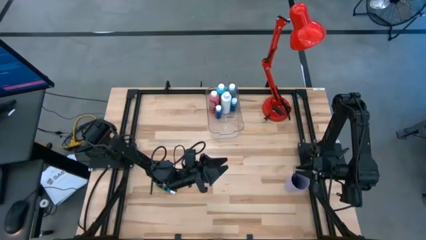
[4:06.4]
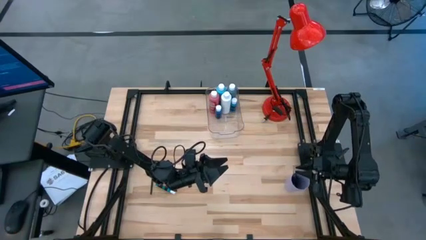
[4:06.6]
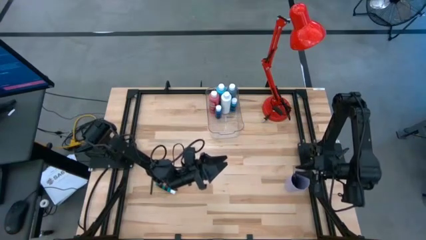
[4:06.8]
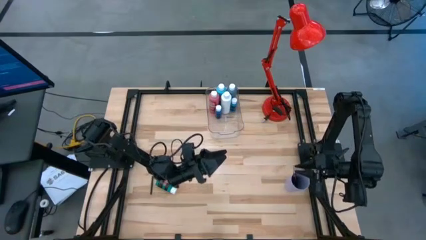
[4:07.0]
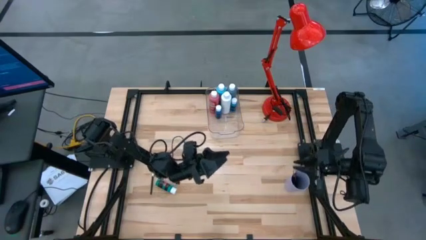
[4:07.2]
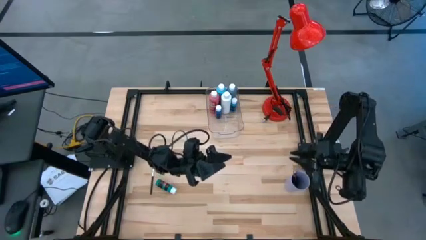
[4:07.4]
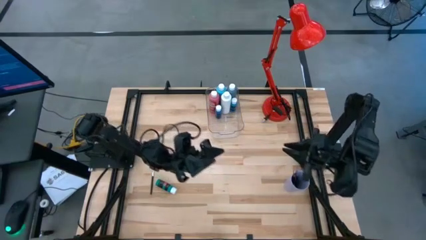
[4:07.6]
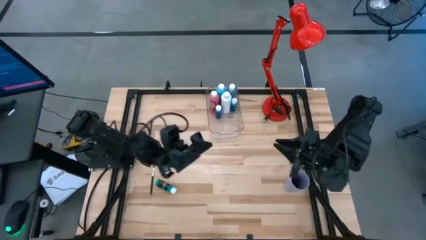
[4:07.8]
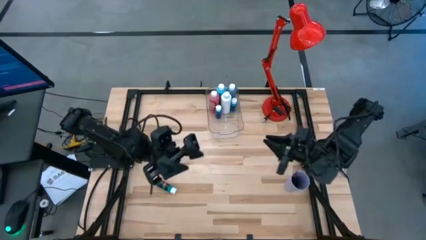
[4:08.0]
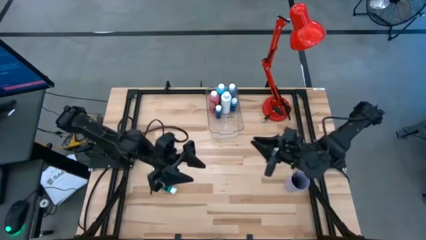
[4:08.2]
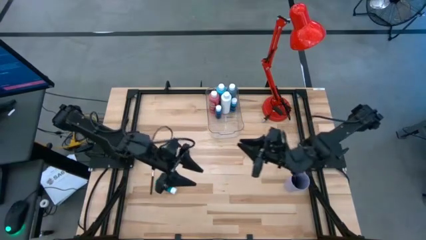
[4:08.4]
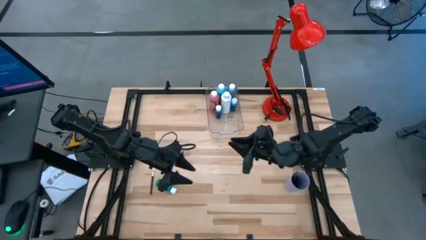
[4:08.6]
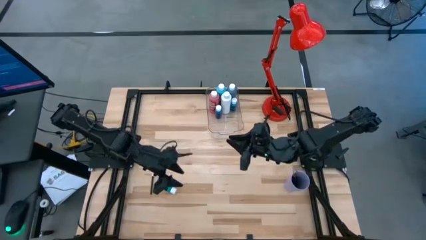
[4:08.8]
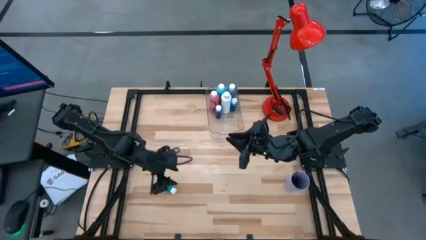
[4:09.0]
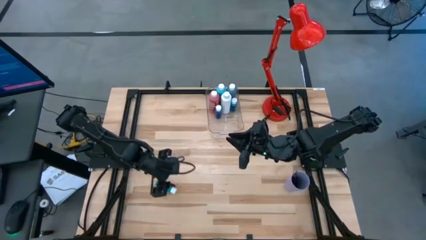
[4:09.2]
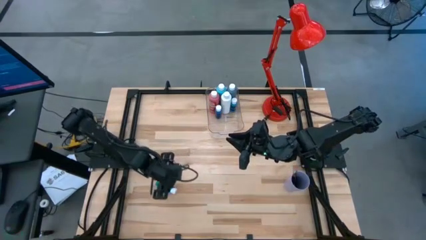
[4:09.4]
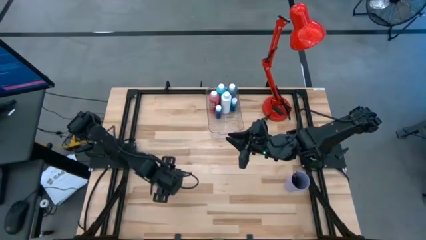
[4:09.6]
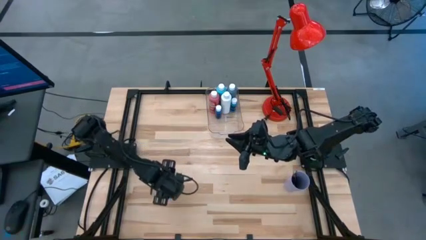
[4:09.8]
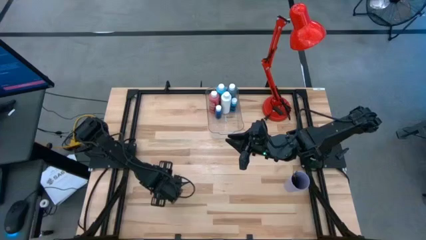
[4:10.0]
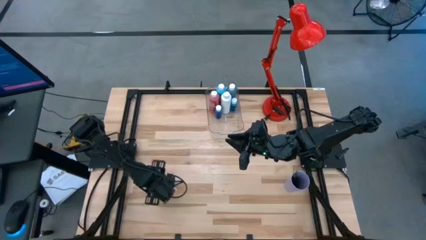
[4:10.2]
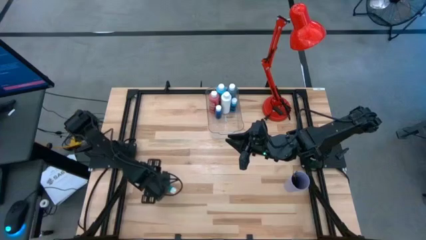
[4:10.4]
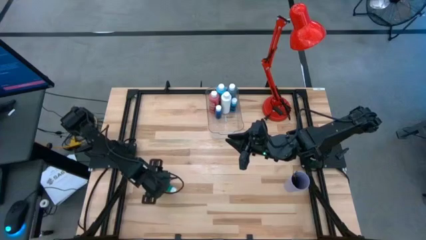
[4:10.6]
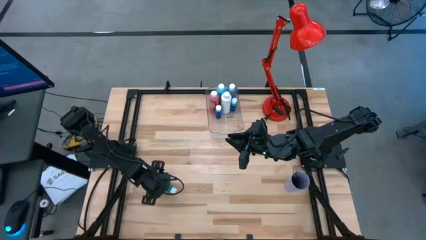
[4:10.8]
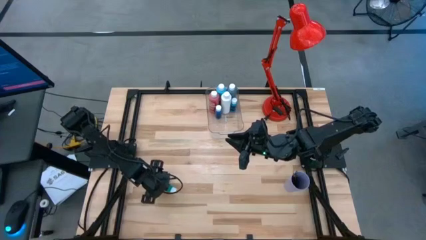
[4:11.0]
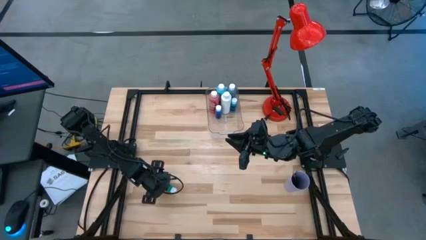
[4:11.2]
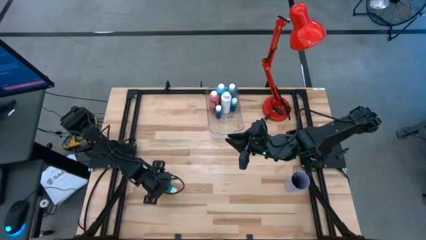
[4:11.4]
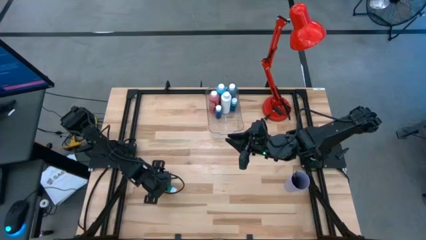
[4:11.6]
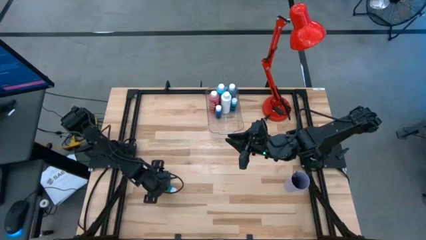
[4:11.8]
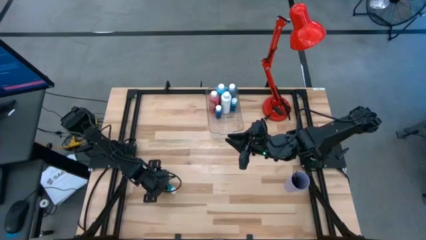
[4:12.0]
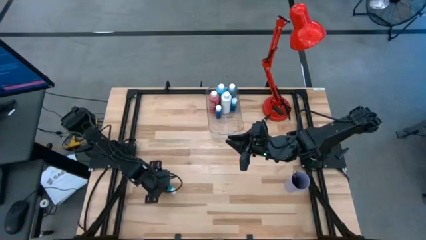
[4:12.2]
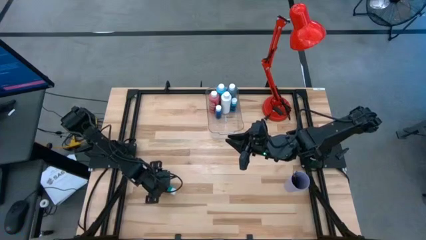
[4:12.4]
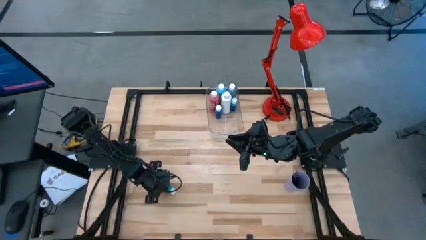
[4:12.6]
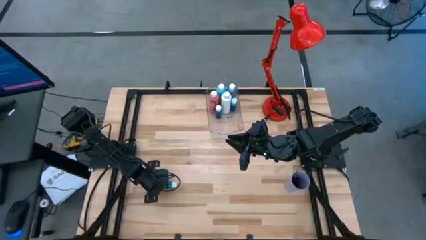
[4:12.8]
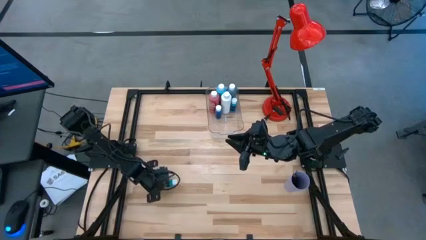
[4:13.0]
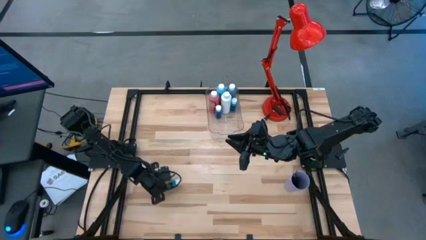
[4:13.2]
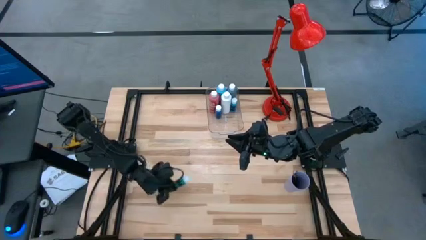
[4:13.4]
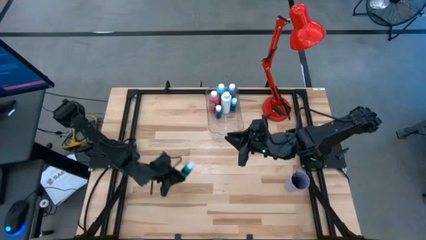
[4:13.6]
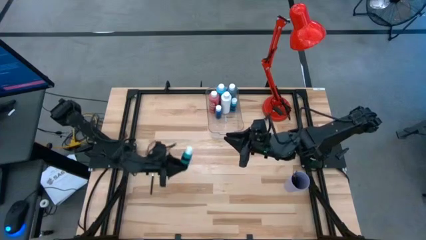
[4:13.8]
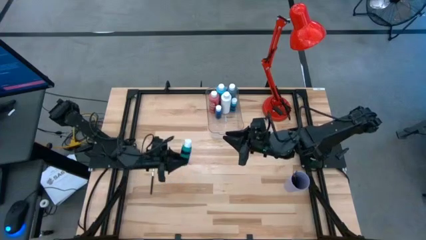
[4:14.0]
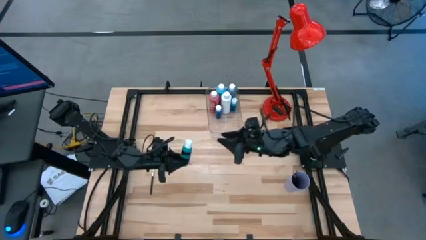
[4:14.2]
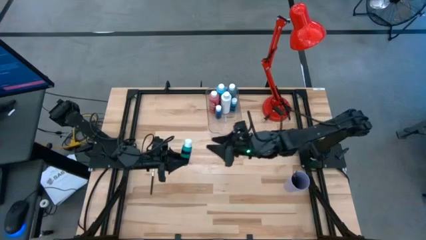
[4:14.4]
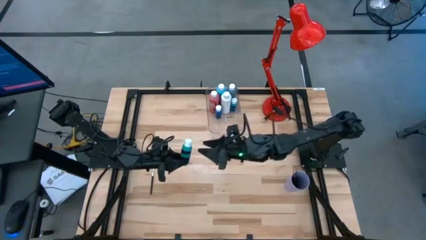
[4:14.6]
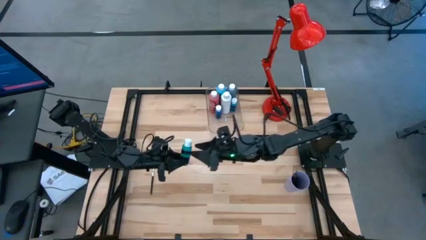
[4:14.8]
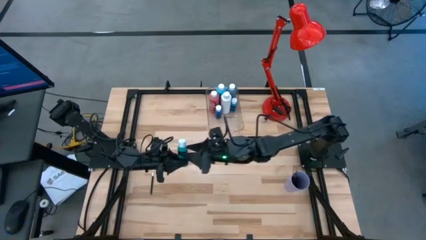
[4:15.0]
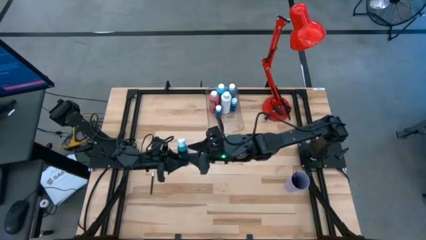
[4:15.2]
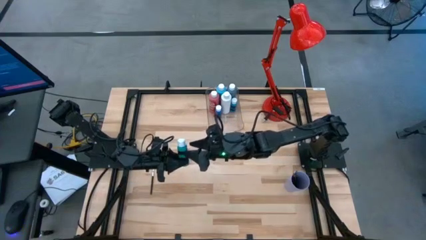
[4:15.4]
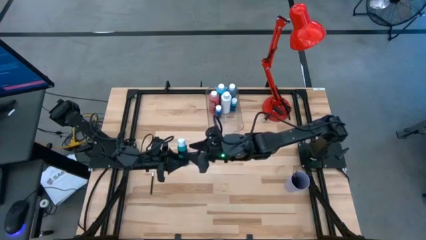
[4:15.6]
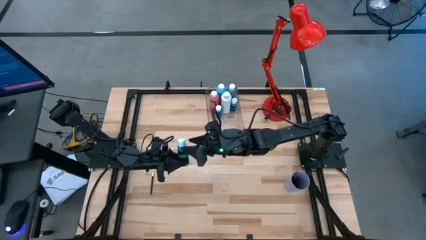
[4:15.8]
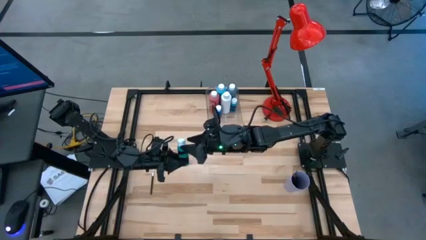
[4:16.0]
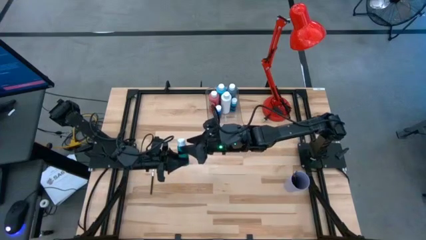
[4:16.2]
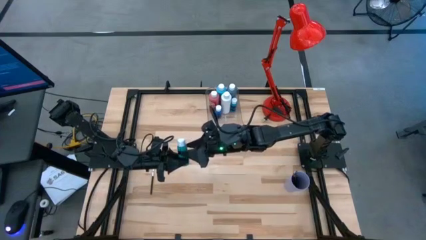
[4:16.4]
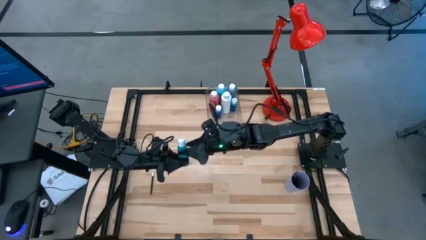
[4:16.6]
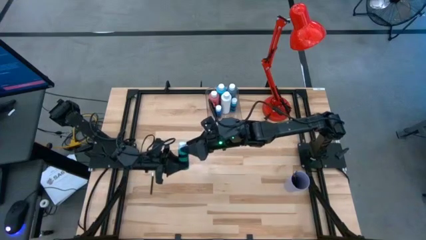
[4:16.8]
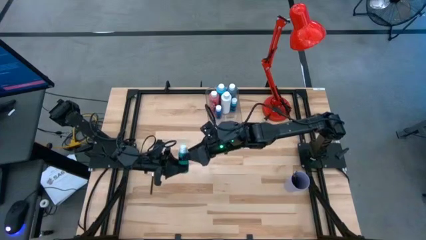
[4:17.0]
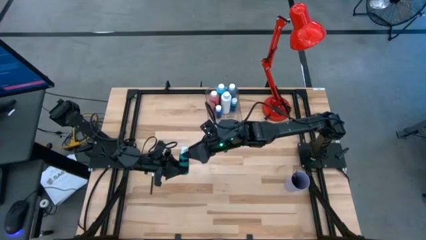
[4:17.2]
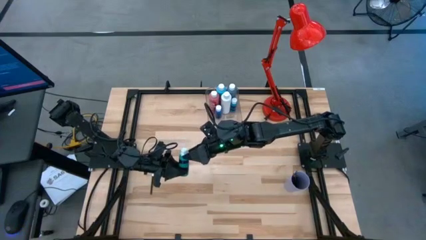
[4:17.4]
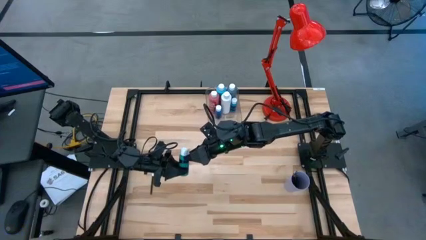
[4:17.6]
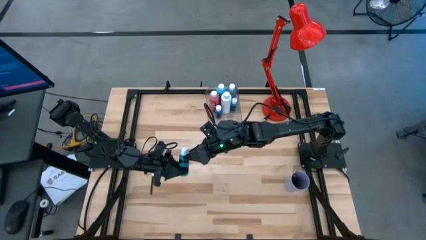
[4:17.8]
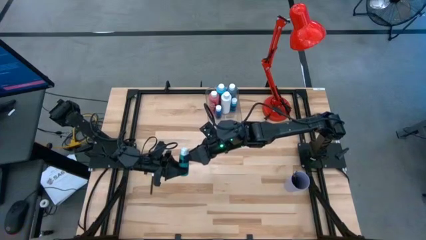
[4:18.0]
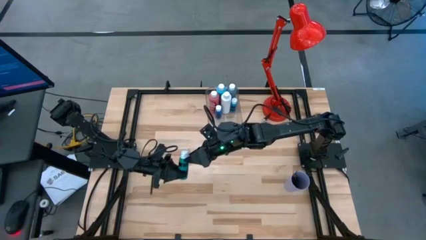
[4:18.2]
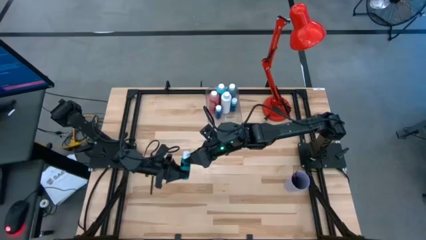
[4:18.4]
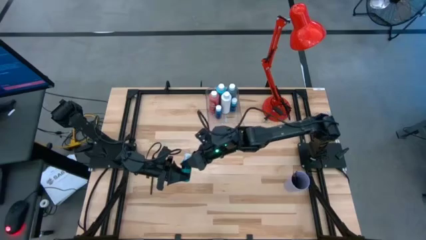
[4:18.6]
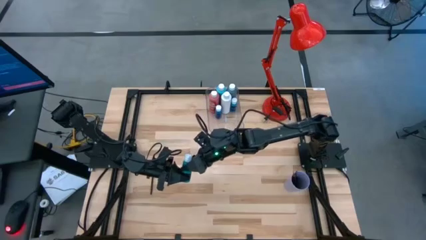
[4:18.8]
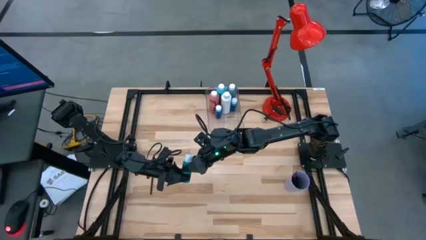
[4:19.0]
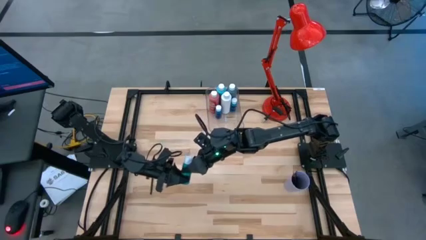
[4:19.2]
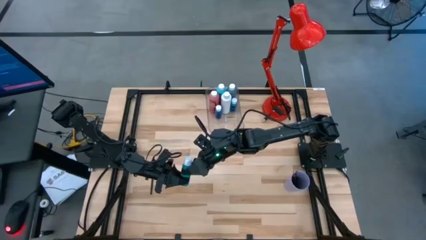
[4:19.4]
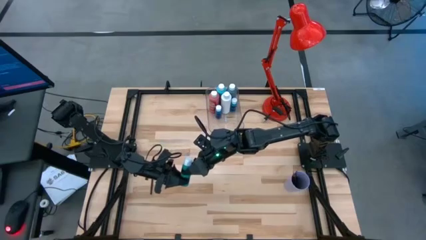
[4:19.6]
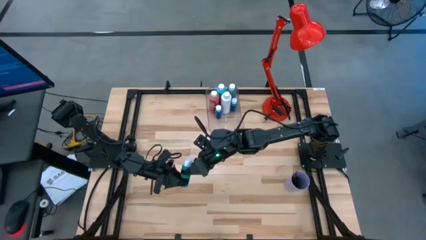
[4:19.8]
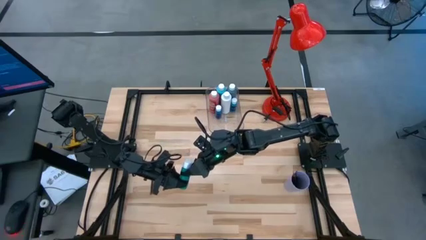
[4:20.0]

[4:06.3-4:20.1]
Task: Pick & Place Paint Supplies
Put the green paint bottle into the transparent bin

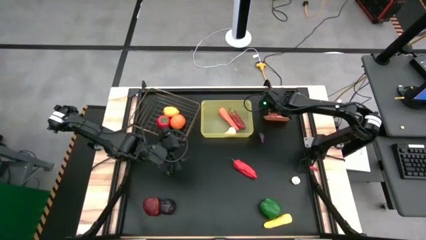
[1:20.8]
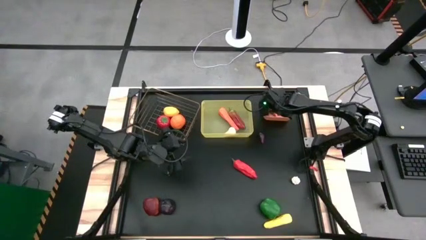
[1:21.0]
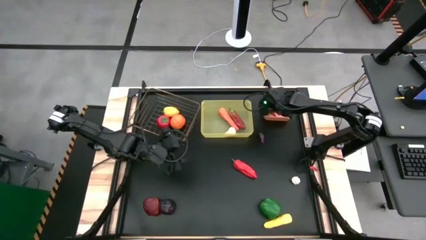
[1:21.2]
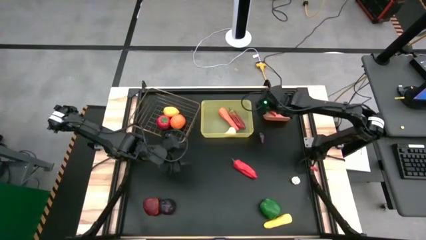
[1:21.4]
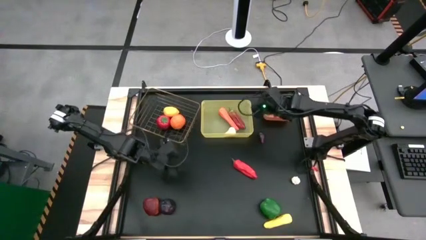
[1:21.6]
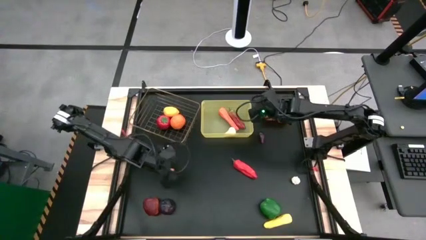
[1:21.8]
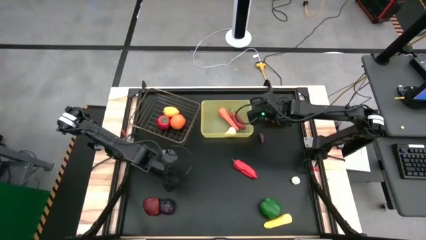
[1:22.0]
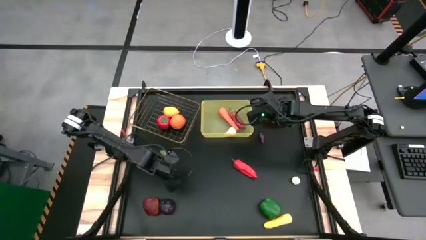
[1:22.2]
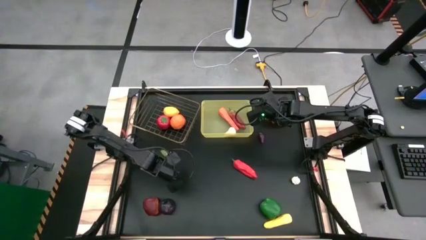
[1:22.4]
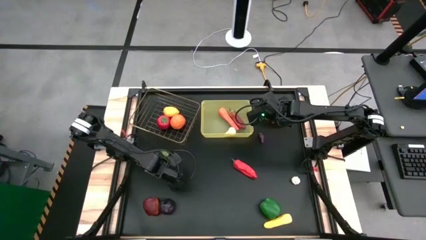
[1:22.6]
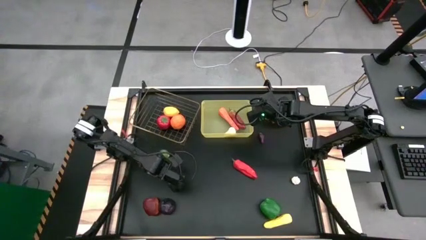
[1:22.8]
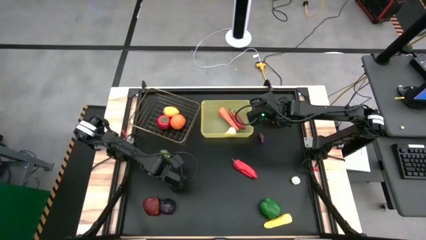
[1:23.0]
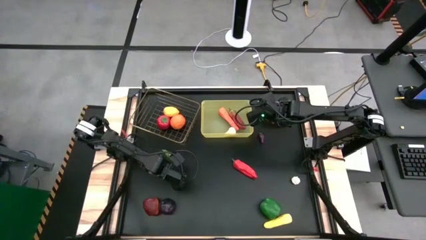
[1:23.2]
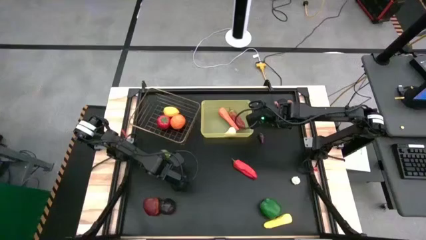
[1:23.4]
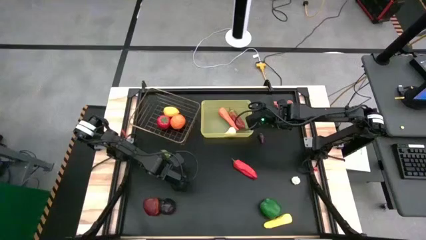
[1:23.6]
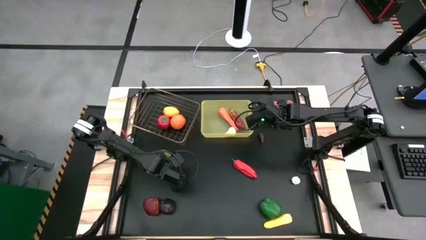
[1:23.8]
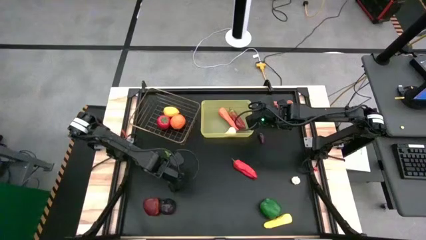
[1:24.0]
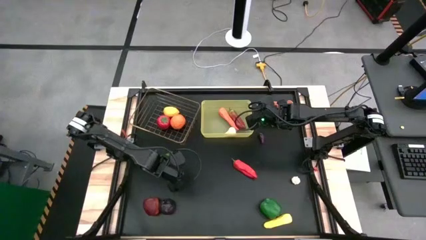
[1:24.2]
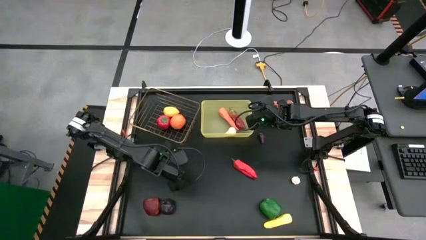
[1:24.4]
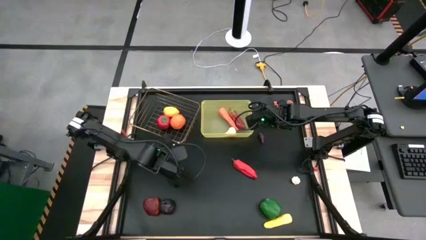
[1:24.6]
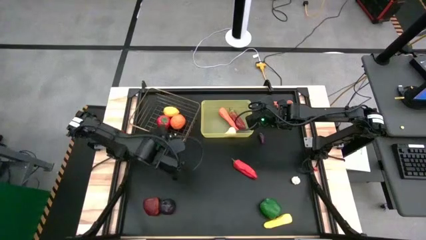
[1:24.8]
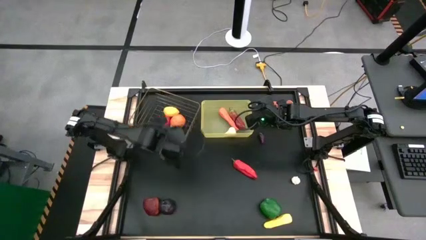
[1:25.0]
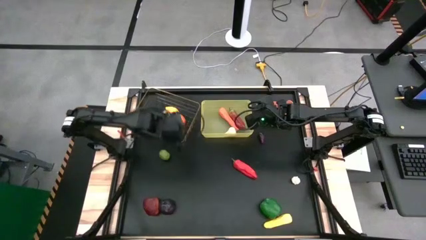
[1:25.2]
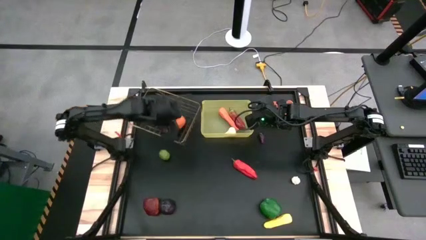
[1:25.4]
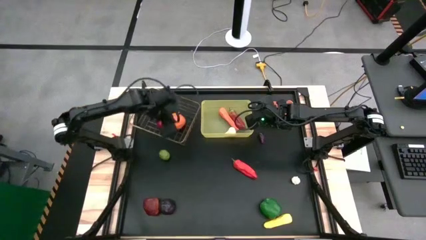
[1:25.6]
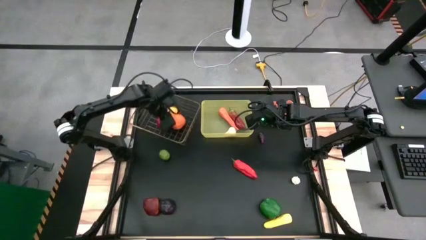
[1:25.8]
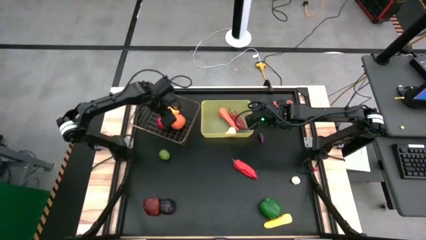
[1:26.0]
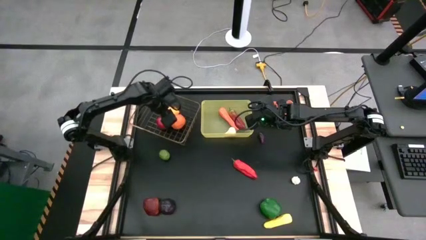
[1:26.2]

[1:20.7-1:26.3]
Task: Sort produce into baskets
Put the strawberry into the wire bin
